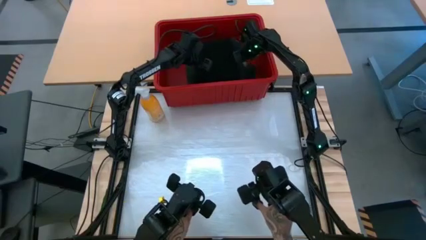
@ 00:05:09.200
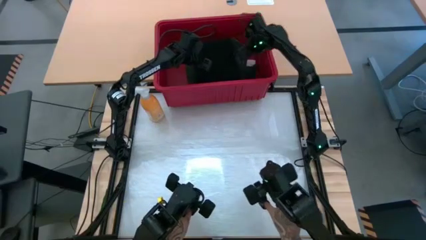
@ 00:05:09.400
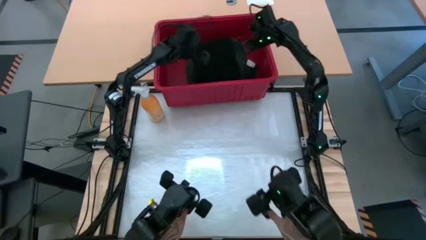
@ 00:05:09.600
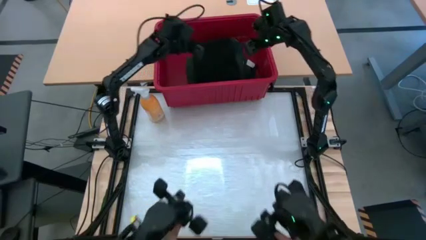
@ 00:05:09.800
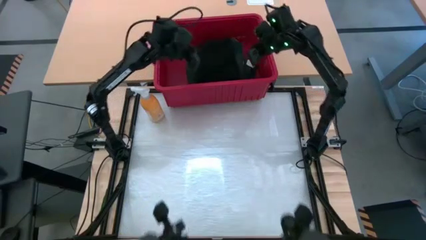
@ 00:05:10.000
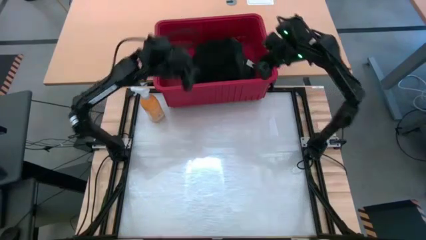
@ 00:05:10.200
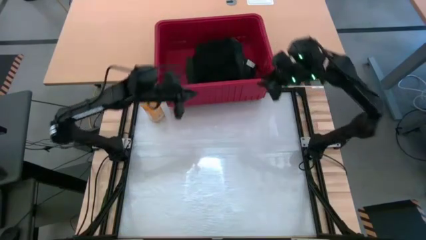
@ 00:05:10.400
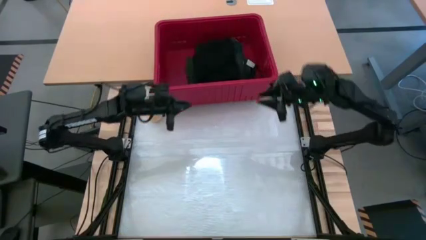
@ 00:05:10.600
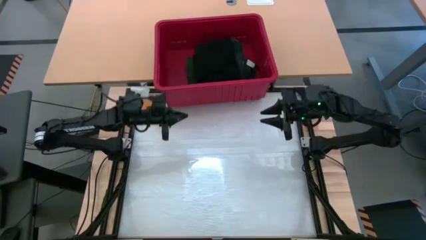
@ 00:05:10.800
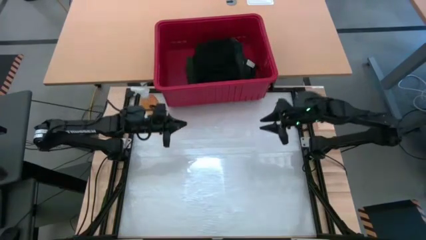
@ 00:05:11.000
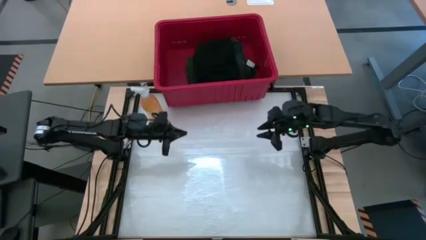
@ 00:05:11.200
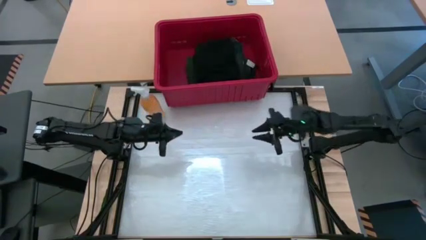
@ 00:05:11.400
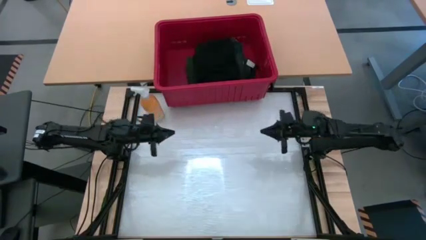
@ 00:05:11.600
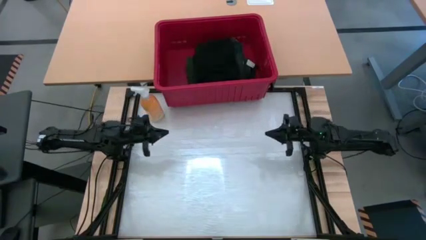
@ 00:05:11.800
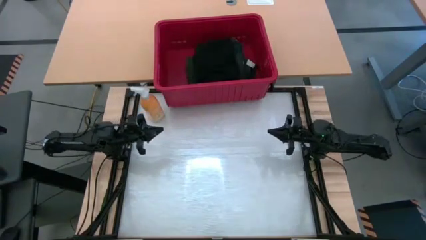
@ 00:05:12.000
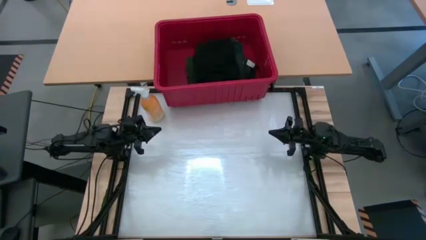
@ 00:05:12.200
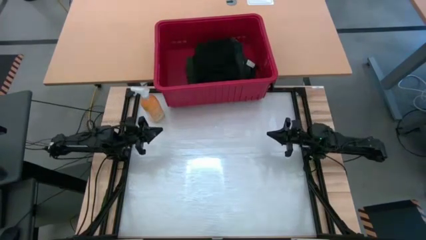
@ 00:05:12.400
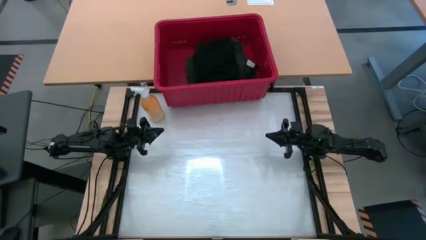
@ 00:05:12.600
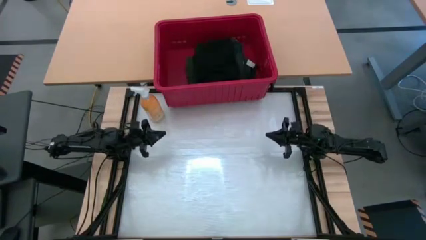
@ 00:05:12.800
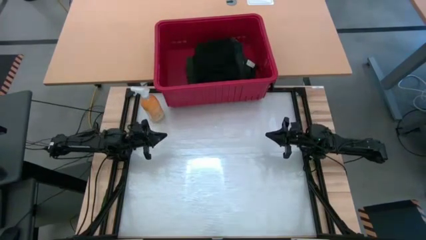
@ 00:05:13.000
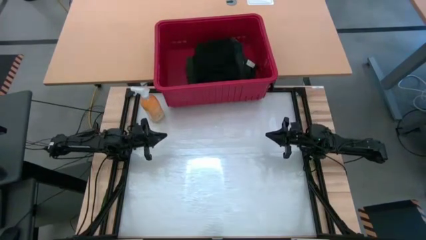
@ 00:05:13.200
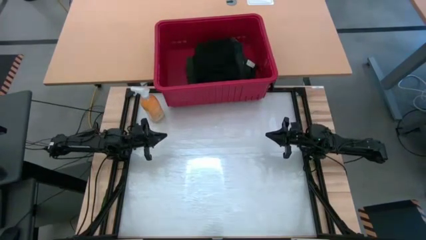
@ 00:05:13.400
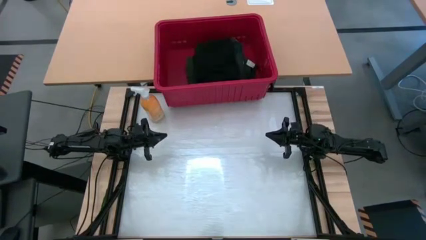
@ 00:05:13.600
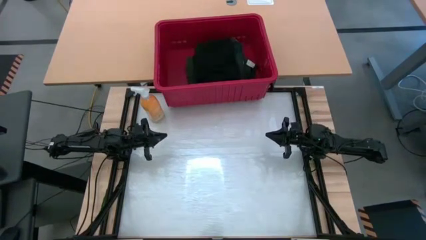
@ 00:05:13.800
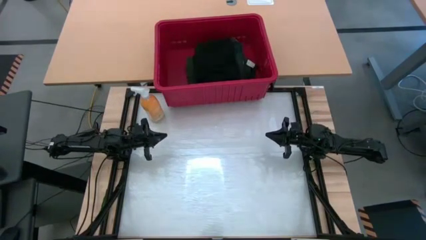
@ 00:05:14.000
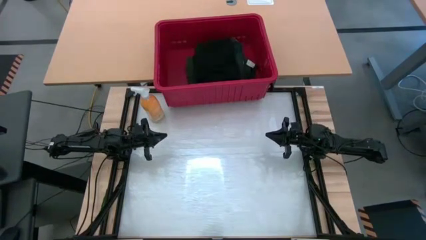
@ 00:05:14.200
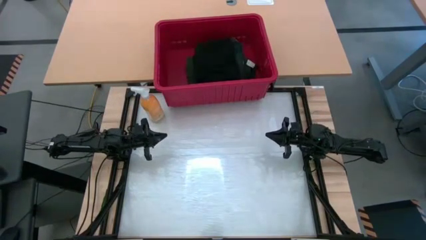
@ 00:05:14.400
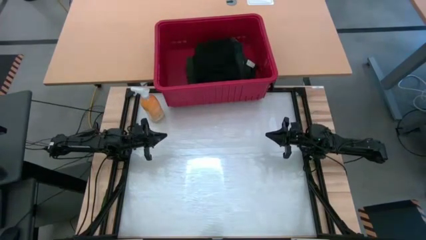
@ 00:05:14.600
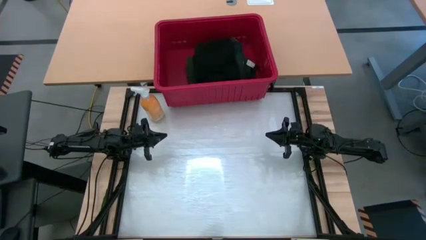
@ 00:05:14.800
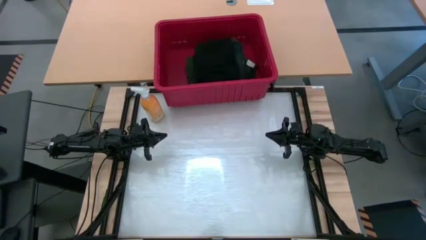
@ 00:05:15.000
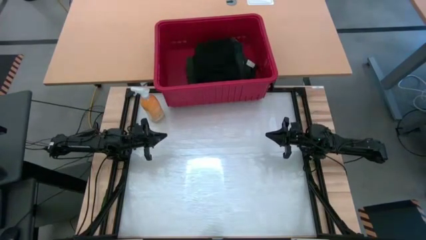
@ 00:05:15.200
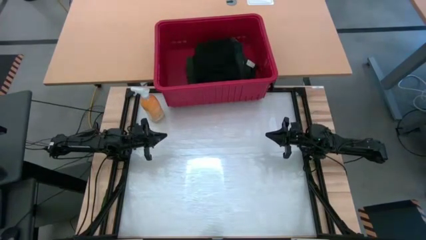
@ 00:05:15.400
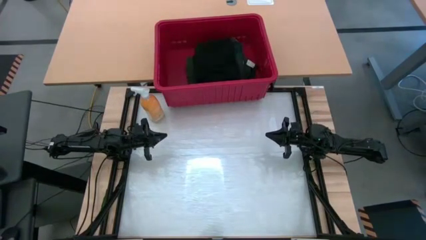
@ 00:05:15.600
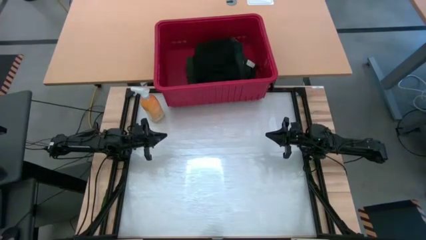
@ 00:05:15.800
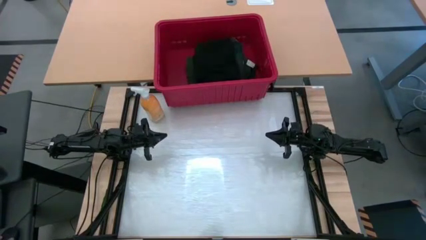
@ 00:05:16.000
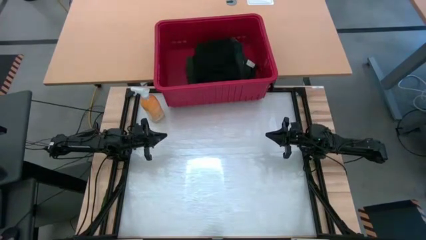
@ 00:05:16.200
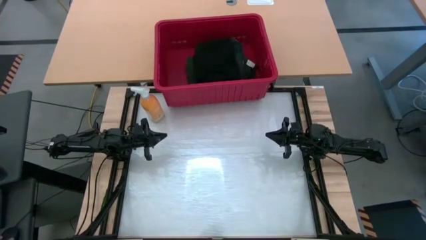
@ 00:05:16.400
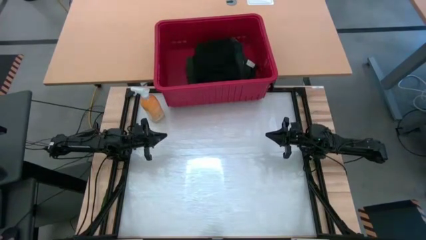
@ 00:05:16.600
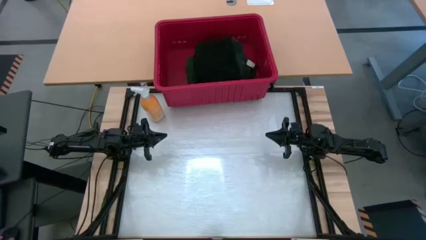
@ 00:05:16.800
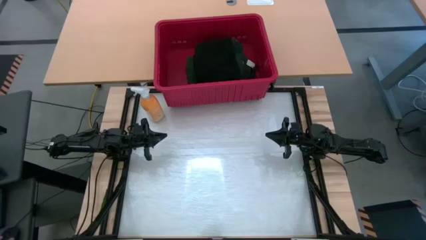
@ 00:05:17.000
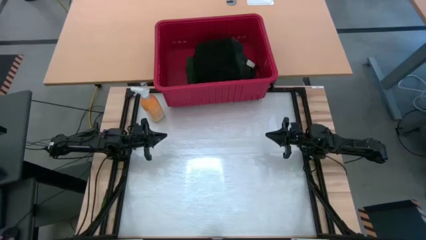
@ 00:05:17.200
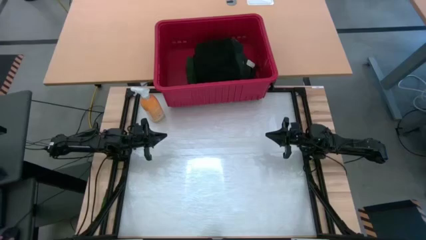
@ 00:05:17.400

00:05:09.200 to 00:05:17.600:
Task: Fold Laundry from Bin
Return to Home Position

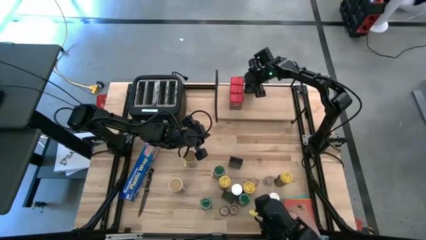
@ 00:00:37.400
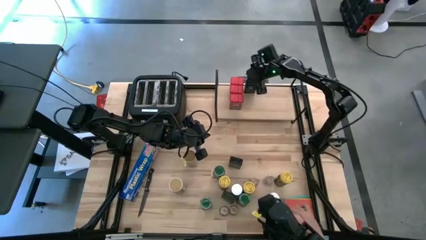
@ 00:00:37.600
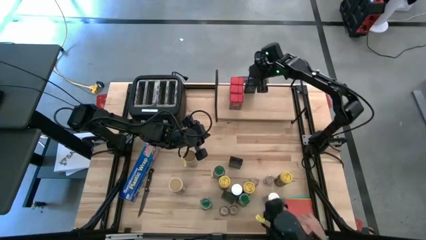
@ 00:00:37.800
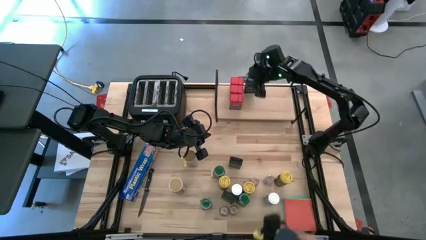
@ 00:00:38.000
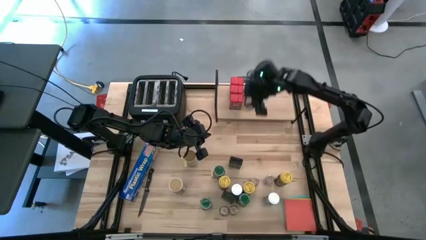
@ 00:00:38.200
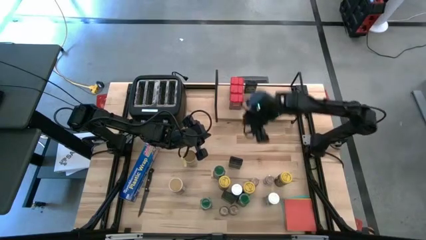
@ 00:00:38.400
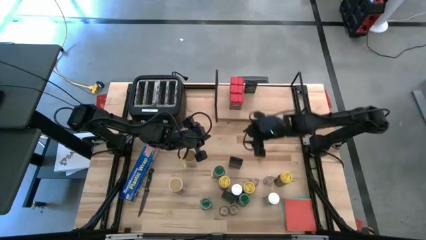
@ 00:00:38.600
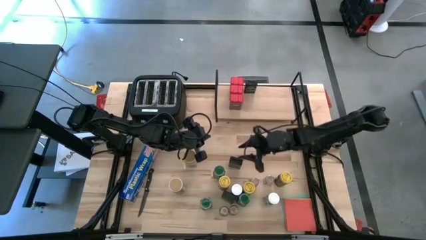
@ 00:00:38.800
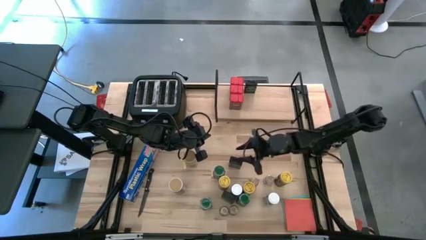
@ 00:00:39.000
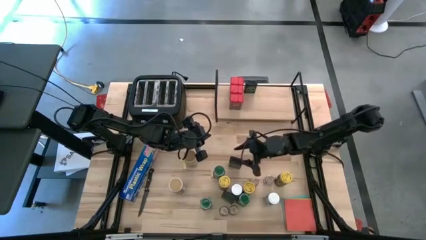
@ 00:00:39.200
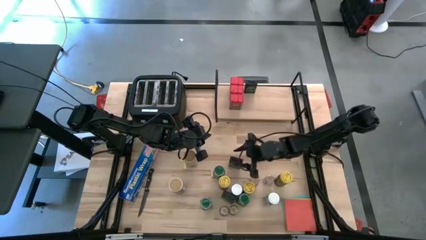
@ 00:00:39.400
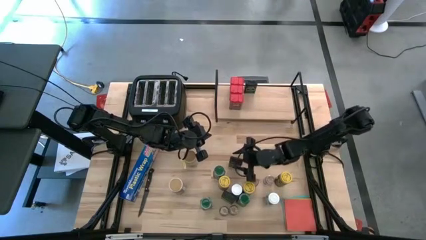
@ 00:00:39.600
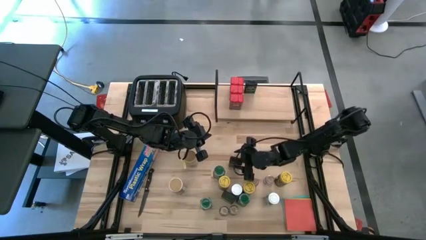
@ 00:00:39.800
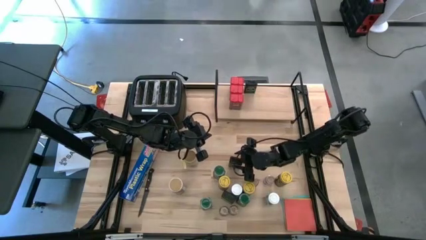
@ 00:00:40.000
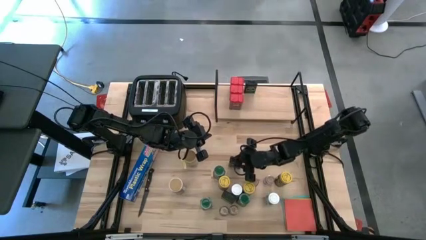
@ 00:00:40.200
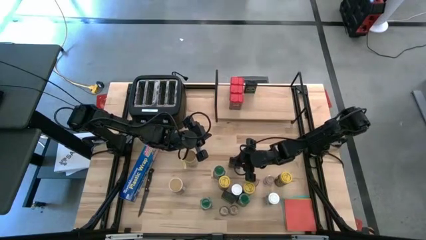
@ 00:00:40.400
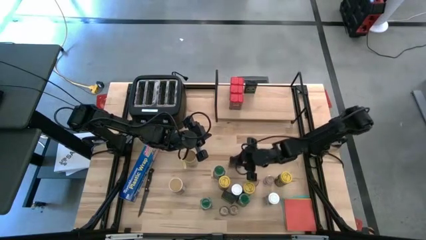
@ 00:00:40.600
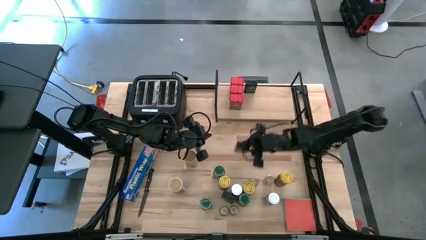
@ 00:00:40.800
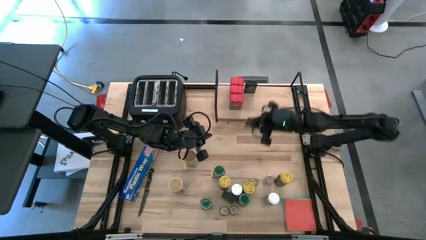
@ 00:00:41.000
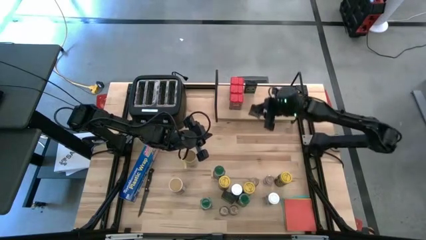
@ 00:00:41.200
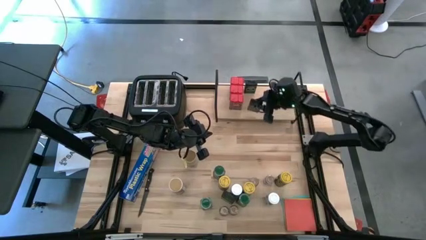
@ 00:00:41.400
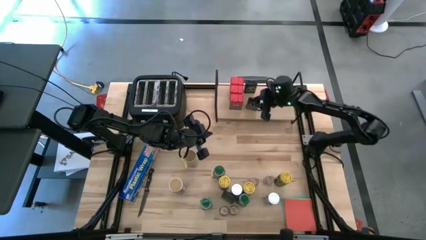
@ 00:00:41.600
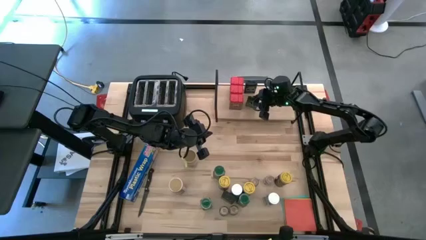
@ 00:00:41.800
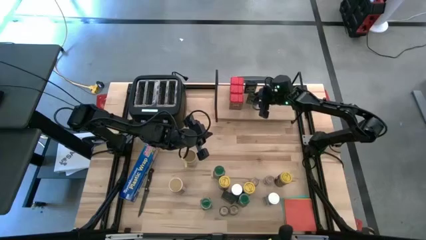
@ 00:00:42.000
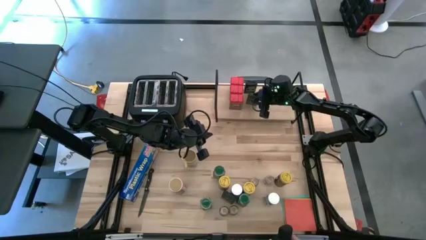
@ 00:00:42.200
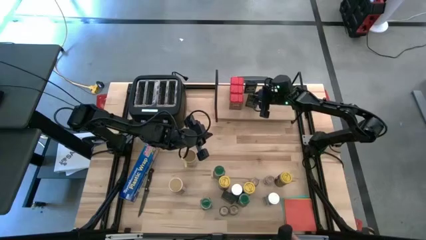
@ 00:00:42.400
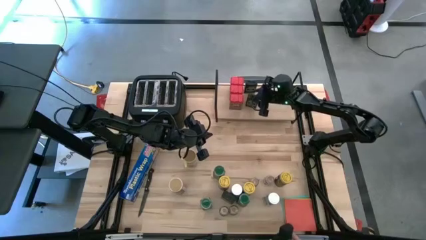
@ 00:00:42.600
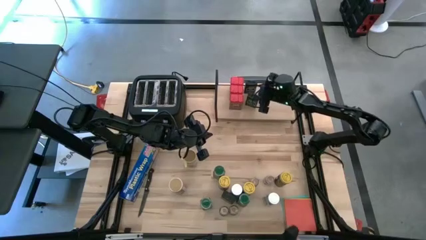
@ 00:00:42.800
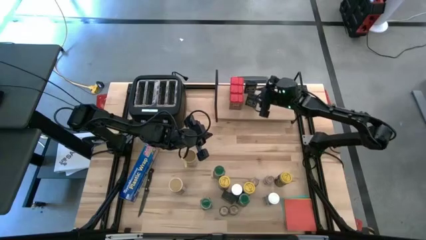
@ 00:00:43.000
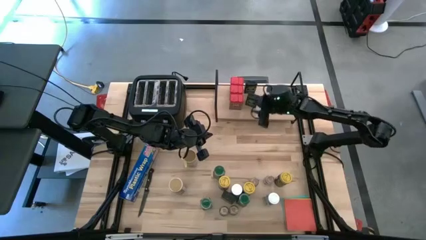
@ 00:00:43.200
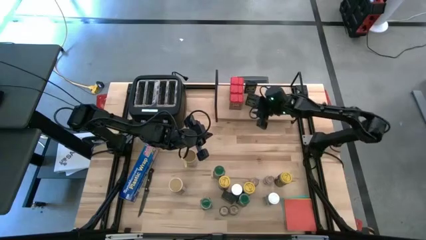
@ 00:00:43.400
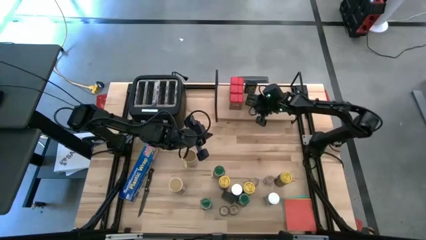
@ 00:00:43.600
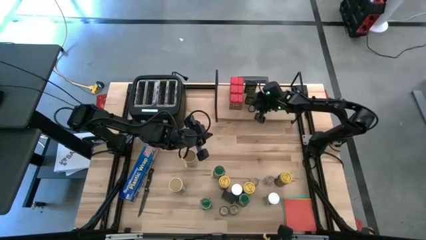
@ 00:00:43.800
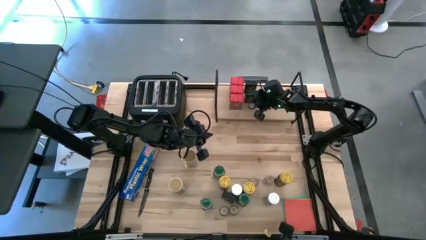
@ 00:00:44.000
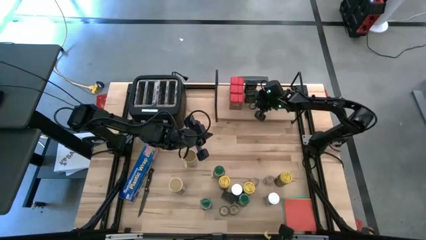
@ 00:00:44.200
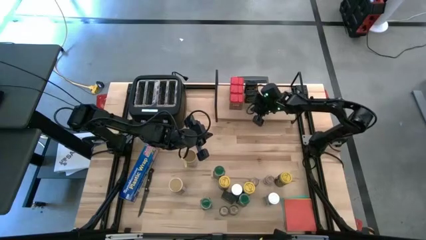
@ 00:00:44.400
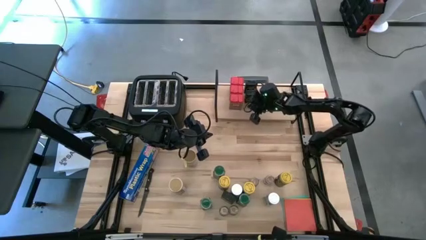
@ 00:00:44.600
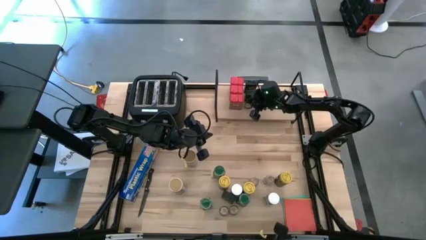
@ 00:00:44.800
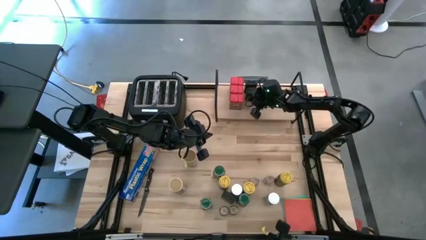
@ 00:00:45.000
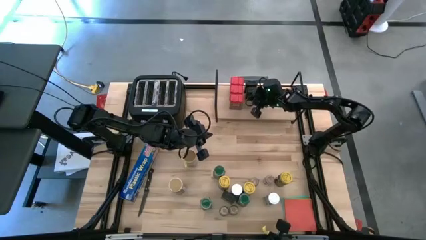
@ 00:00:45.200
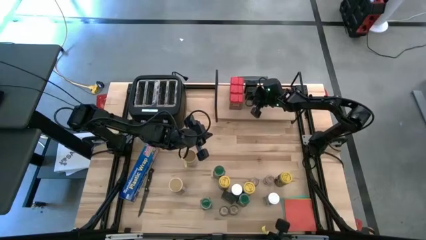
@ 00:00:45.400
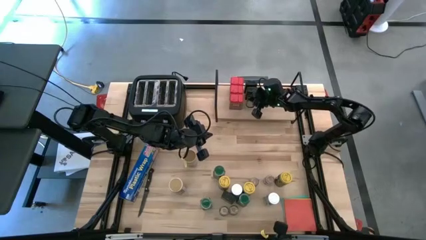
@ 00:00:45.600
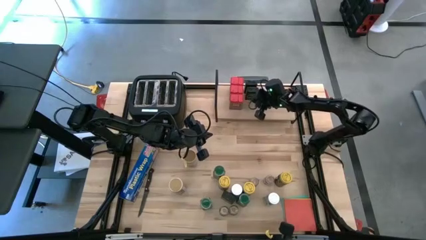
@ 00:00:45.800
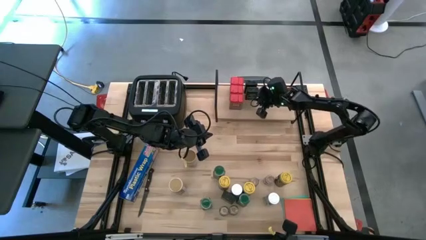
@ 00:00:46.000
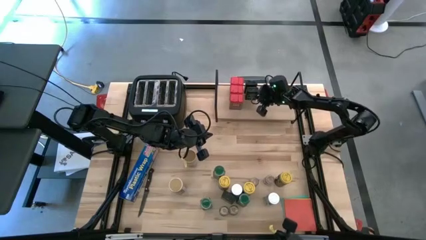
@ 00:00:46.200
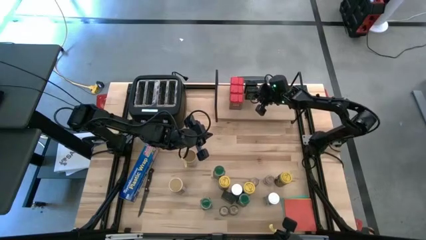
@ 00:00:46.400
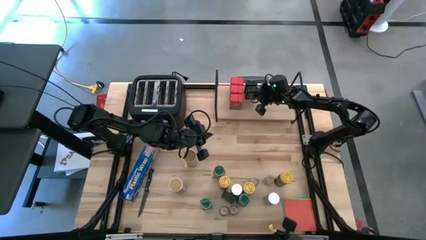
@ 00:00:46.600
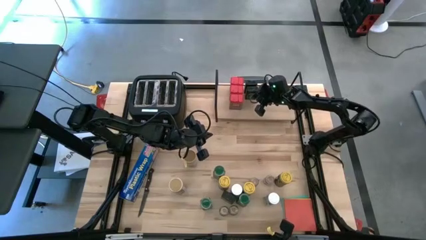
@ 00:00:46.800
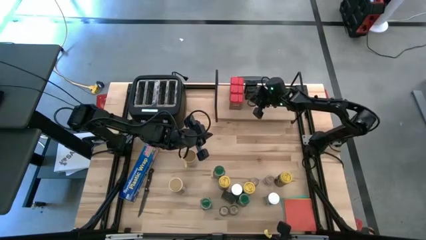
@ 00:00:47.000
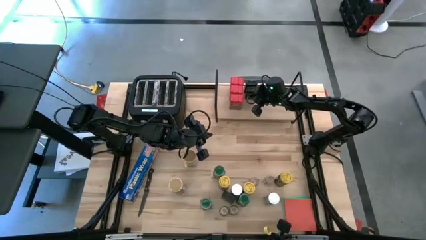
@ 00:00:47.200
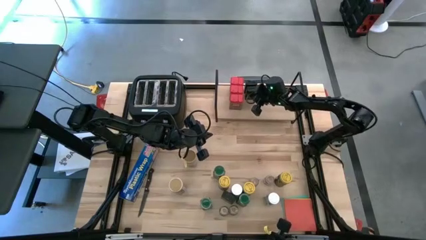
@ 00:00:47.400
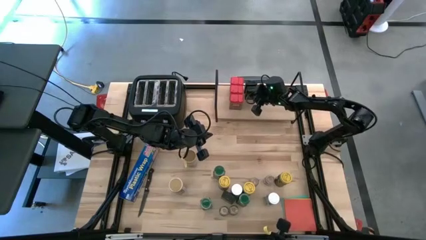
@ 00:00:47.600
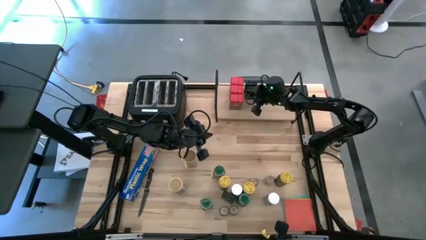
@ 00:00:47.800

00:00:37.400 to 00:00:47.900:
Task: Shelf spices
Put the top black seasoning can on the shelf aligned with the other black seasoning can
